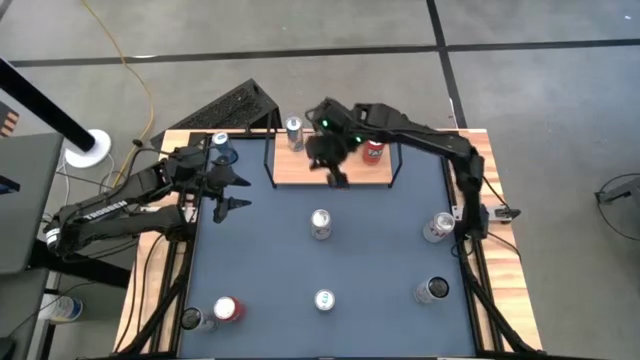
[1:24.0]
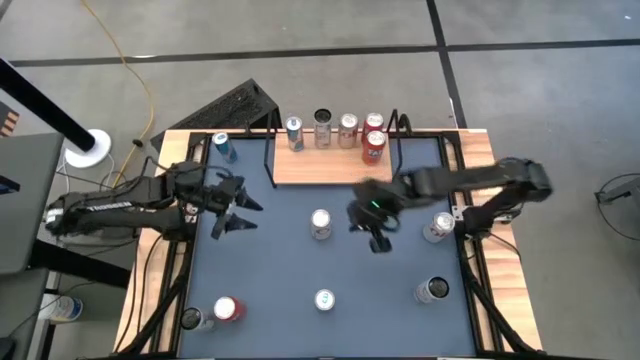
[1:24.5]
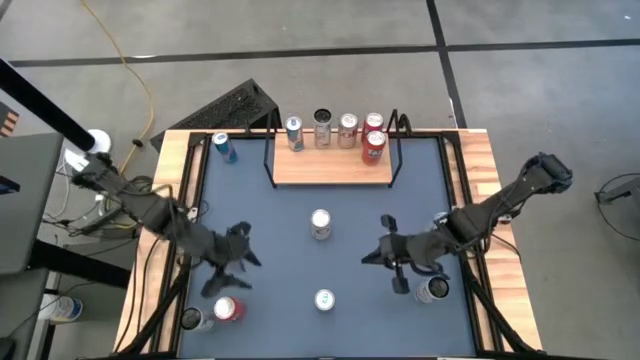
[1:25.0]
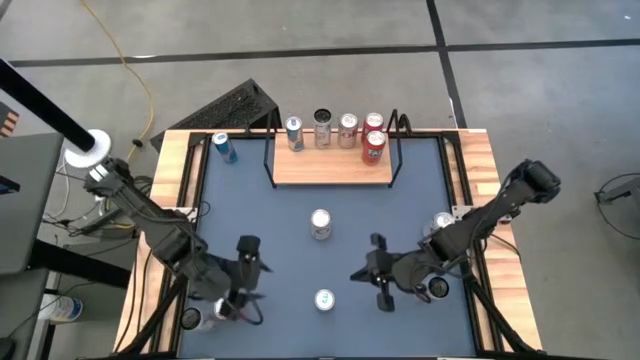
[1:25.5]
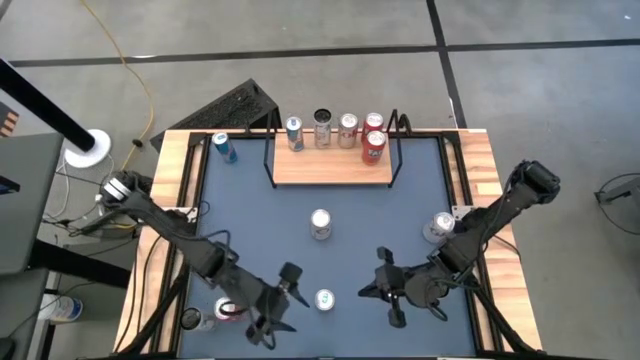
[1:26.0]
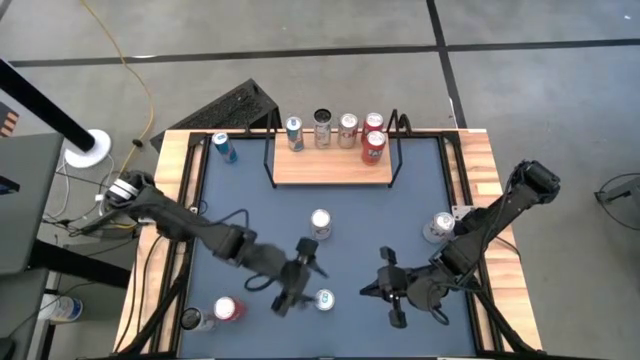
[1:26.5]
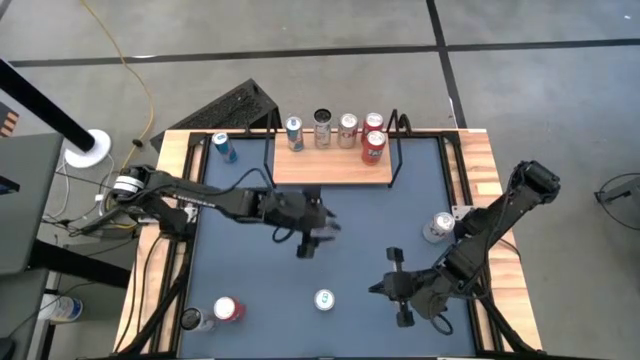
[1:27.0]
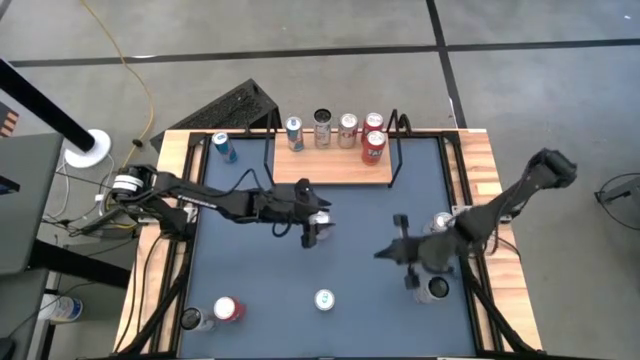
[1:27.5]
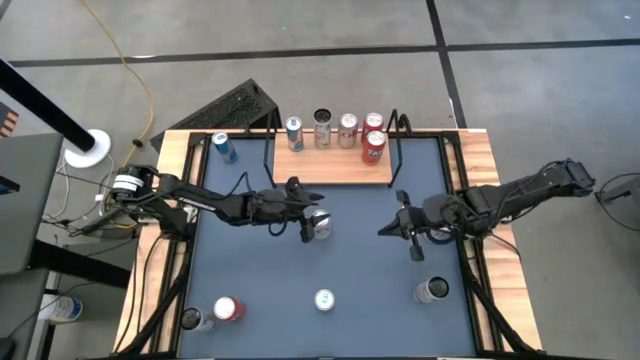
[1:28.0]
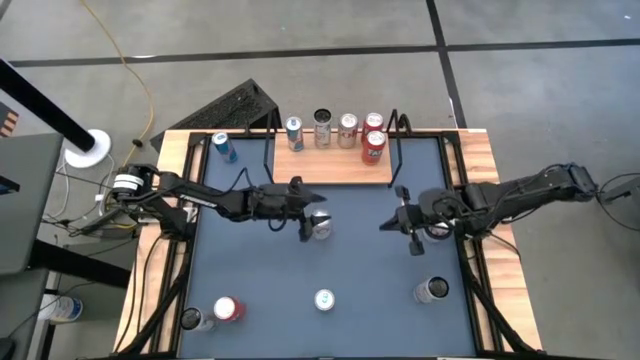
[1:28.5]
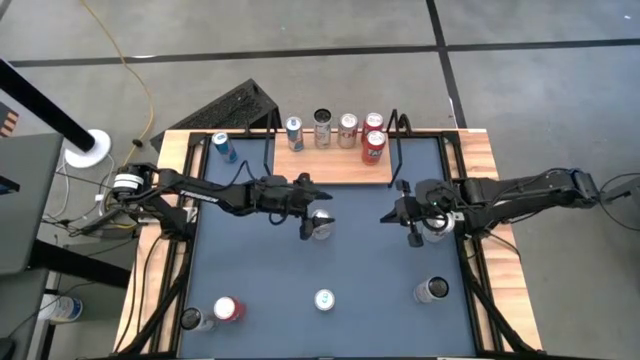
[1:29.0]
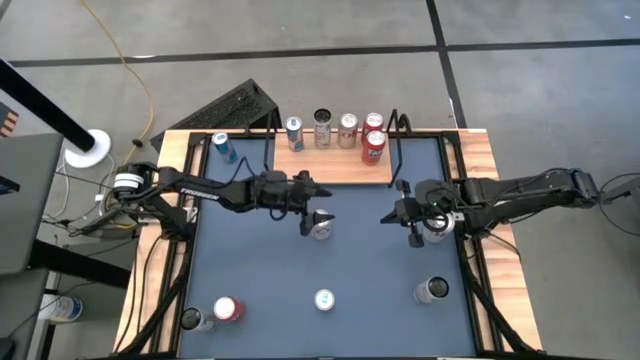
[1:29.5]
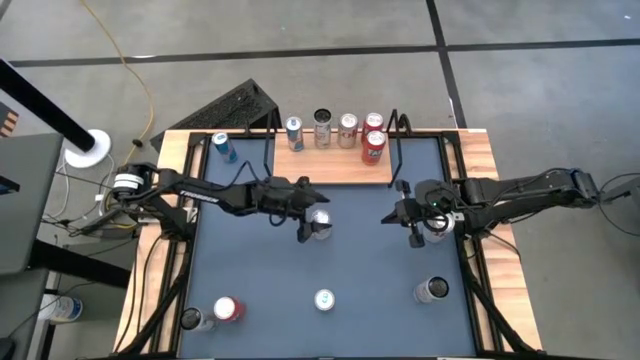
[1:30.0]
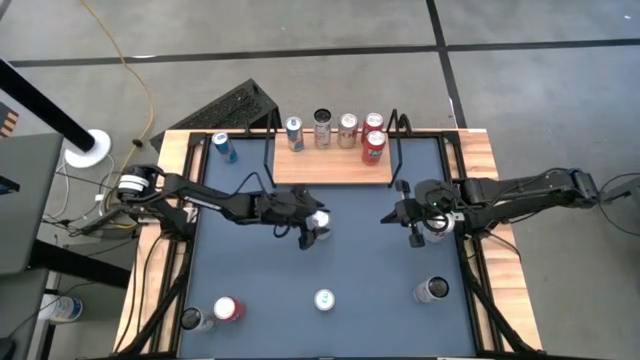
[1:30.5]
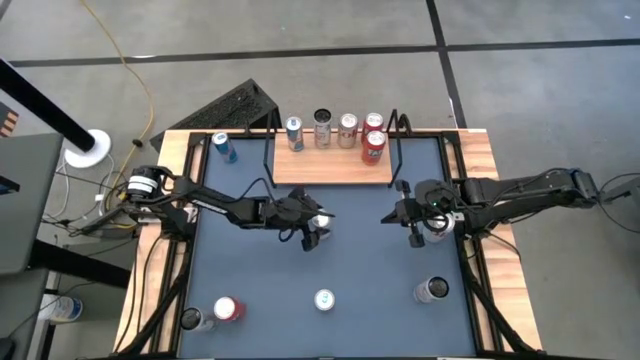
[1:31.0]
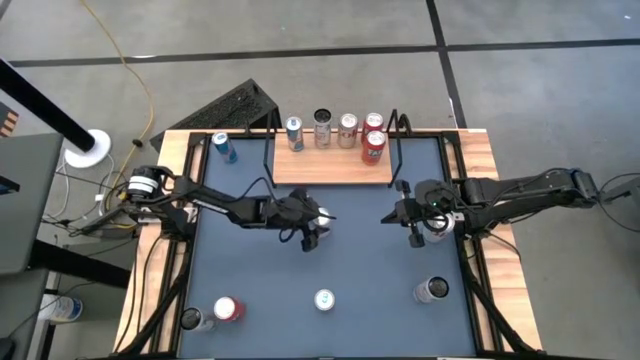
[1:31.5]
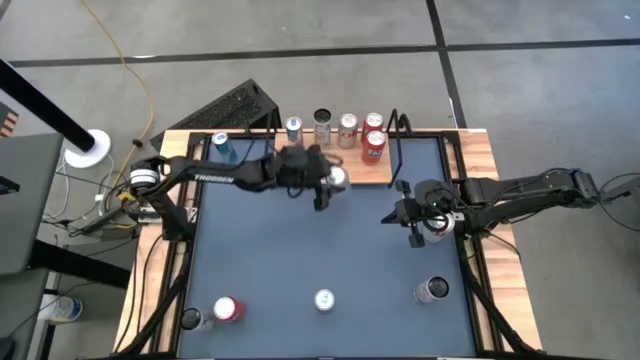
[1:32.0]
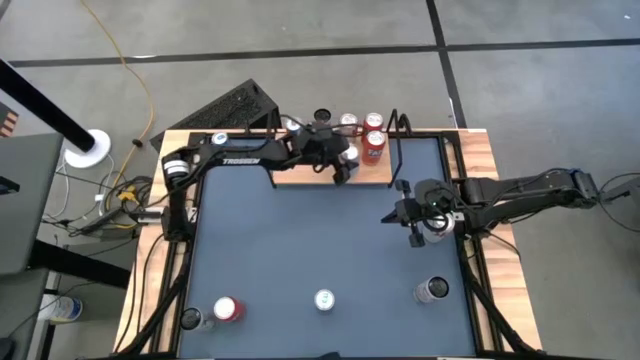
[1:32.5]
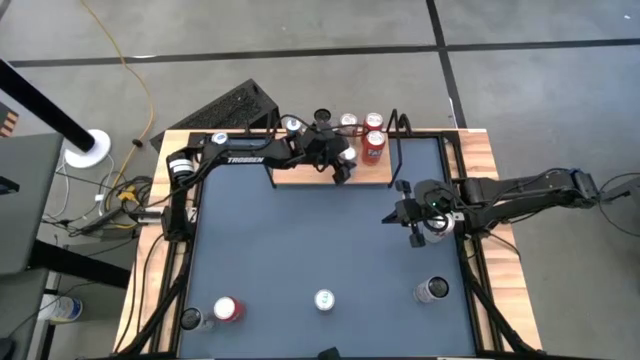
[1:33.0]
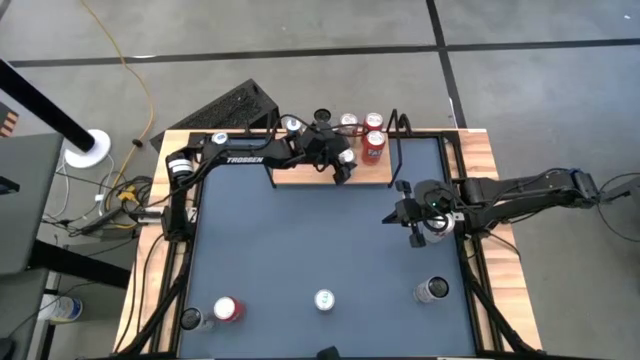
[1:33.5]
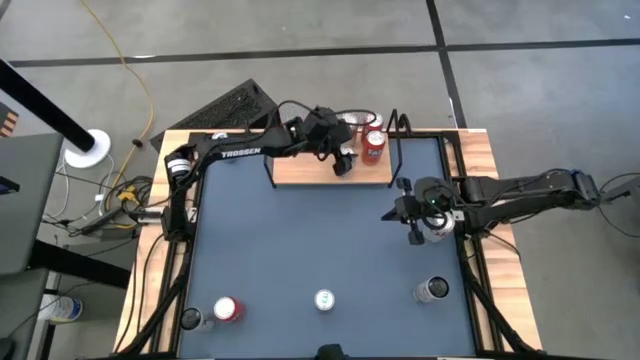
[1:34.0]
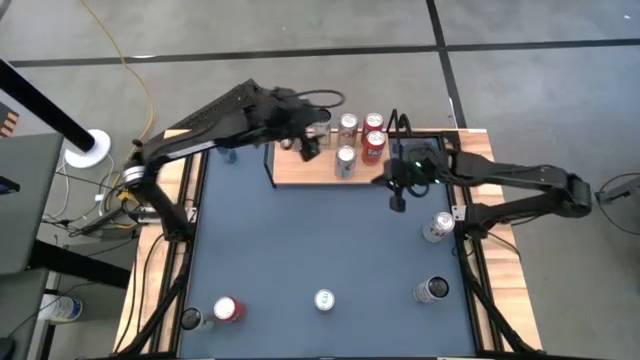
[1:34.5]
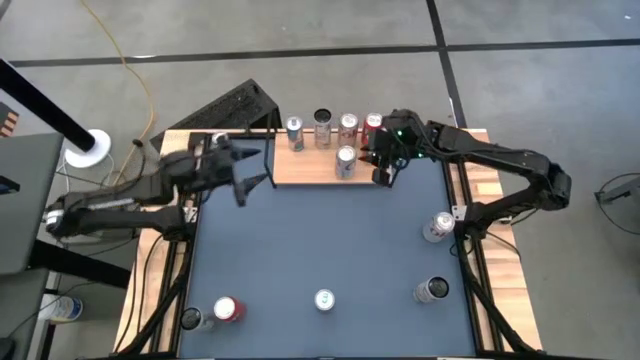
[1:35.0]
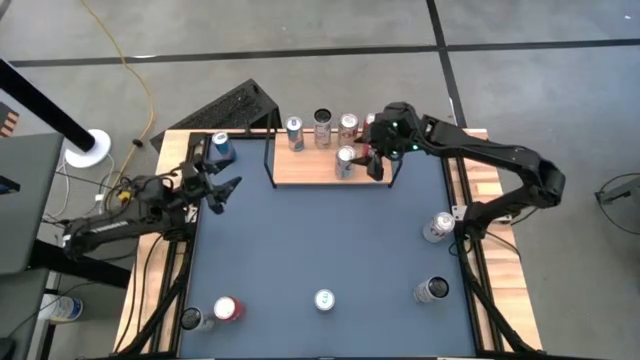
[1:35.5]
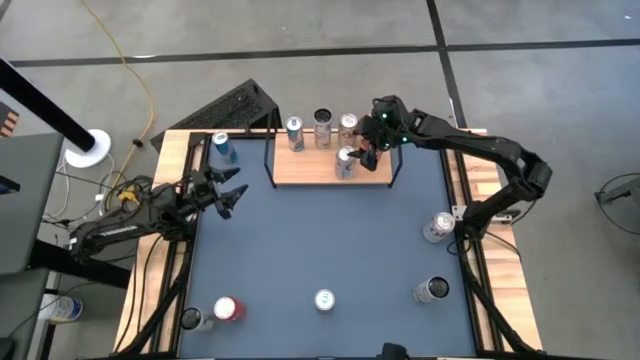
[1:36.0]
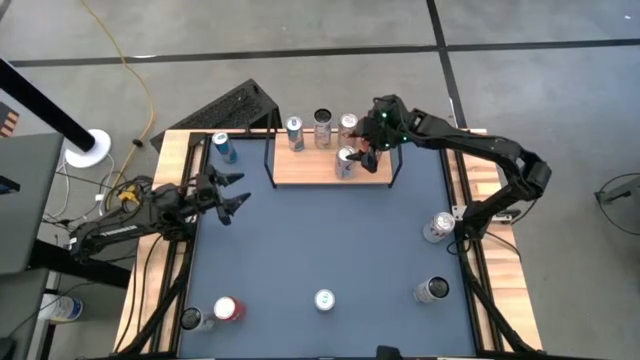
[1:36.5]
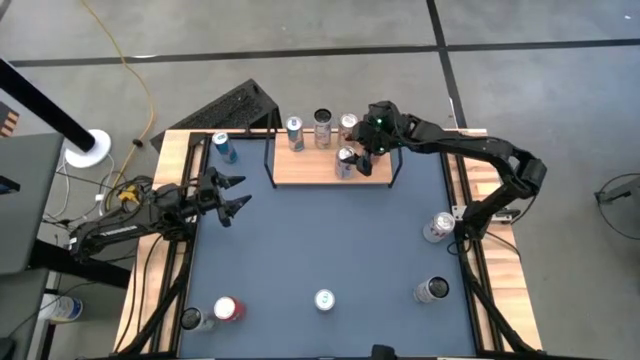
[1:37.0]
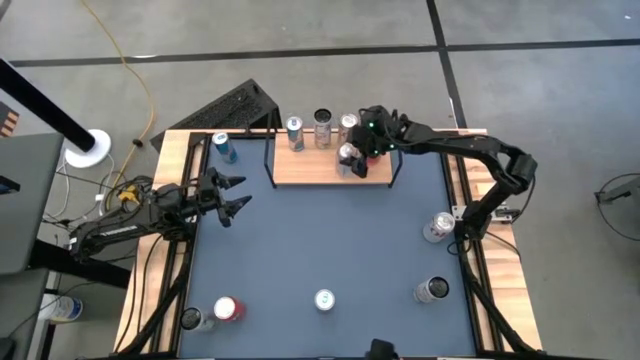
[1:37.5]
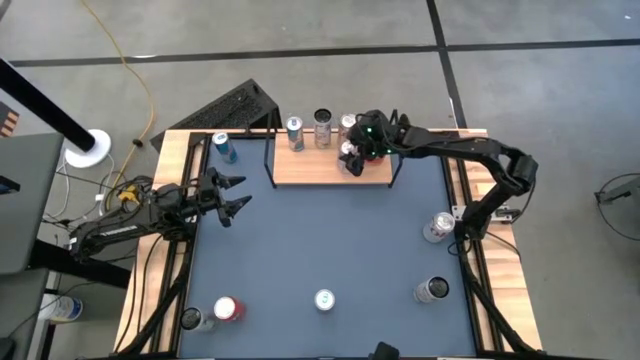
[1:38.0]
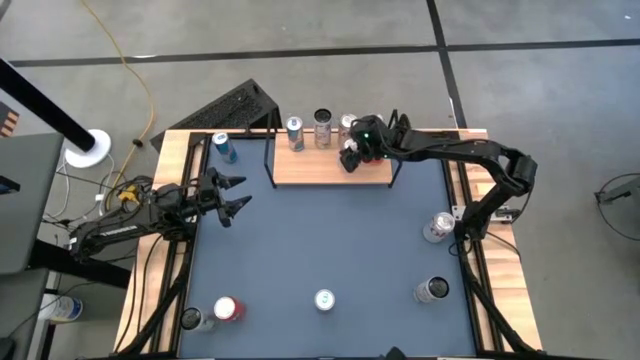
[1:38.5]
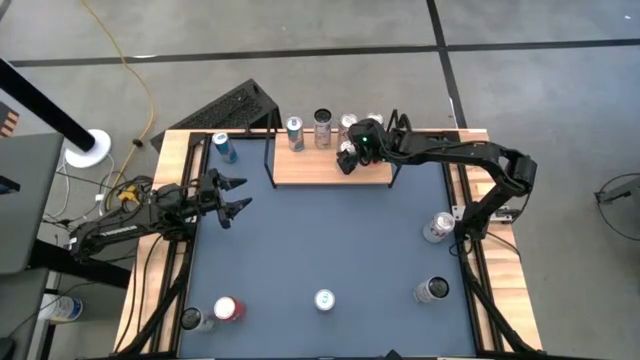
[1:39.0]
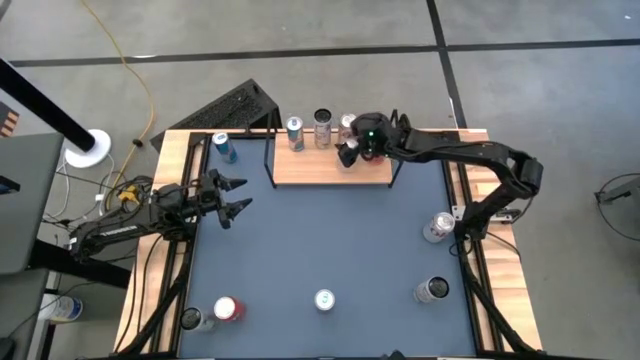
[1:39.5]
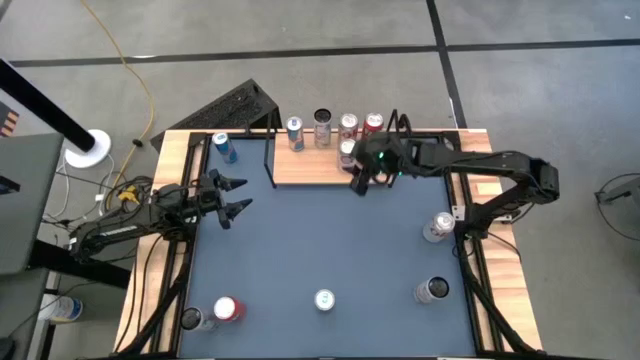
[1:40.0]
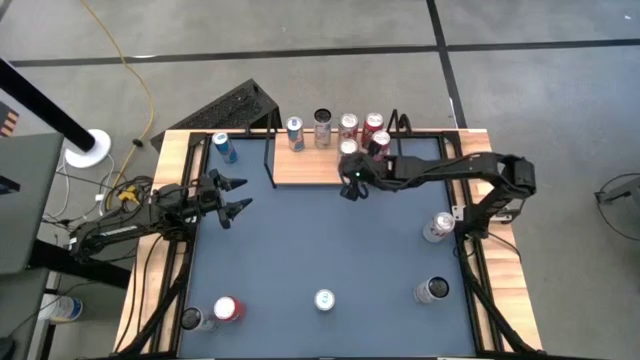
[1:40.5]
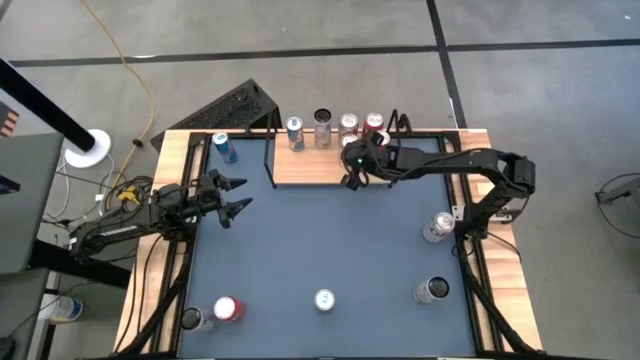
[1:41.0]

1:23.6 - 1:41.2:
Task: Place canned beverage on shelf
Put the left red-silver soda can on the shelf aligned with the other red-silver soda can

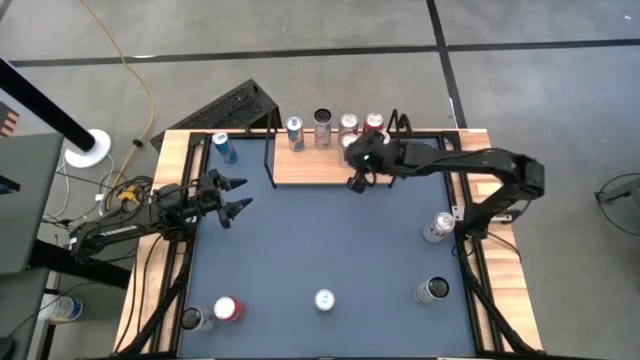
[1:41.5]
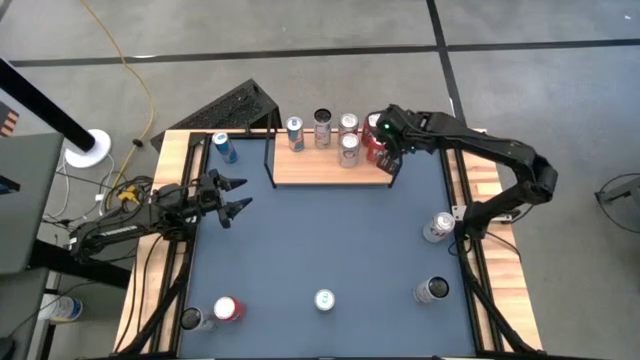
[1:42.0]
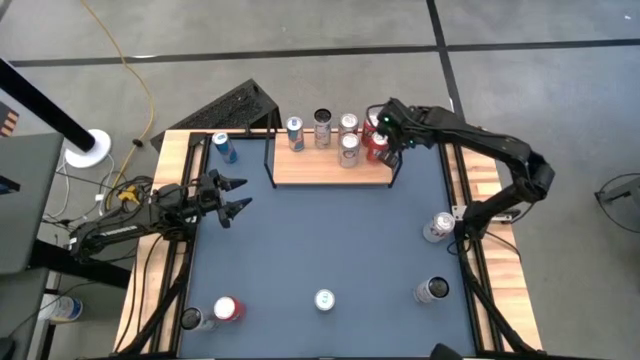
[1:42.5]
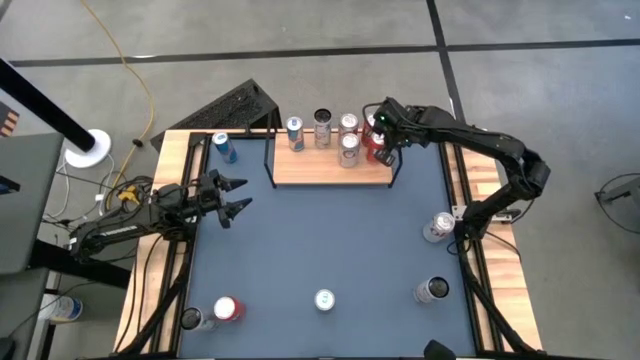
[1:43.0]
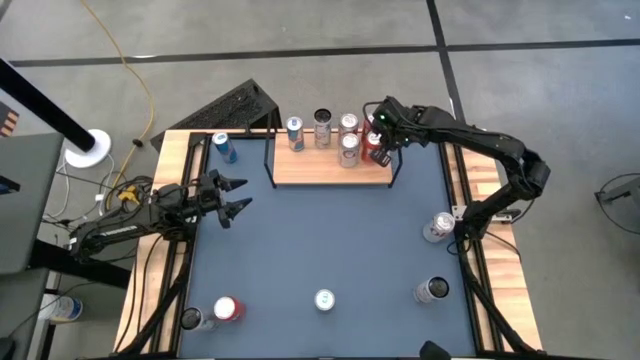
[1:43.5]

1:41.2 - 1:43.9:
Adjust the red soda can on the shelf

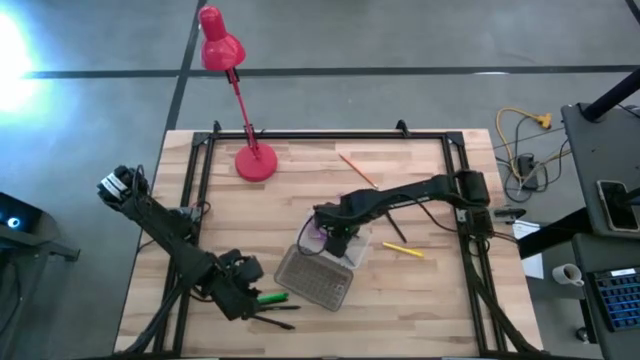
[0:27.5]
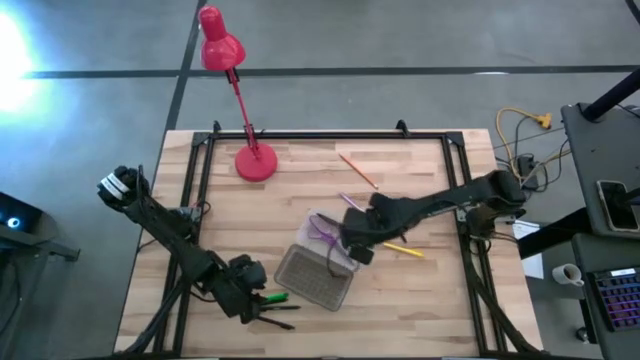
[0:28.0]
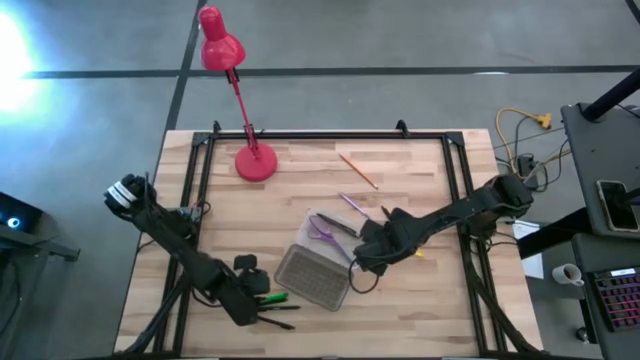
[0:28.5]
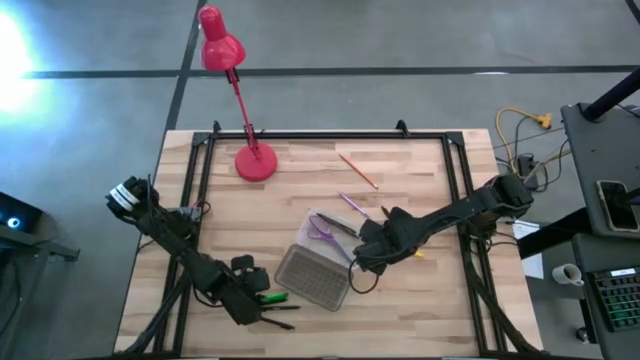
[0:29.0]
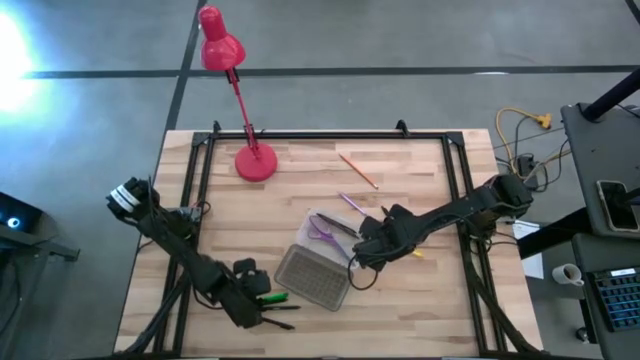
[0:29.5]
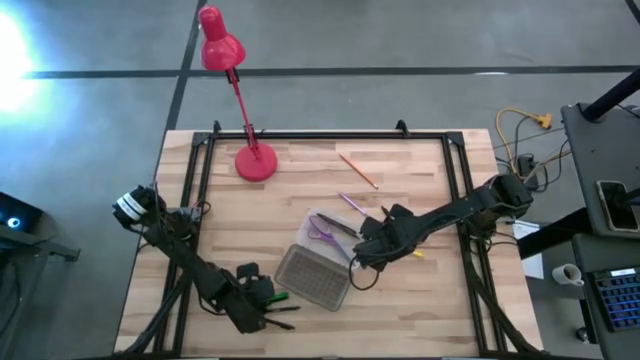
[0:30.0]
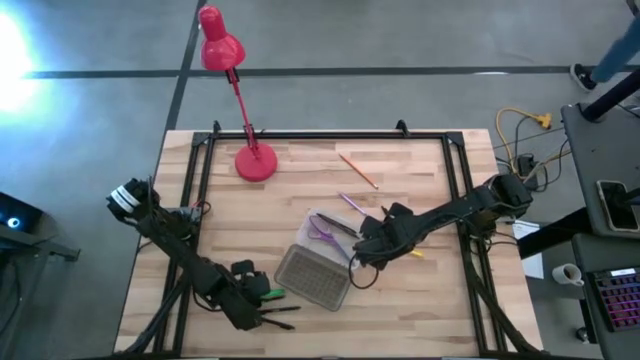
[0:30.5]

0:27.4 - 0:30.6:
Task: Pick & place school supplies into a supply box
Put the green pen into the supply box
